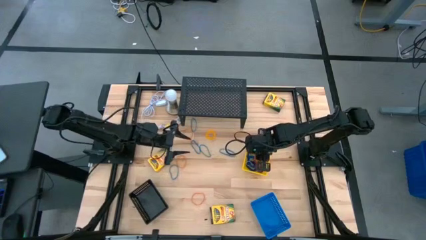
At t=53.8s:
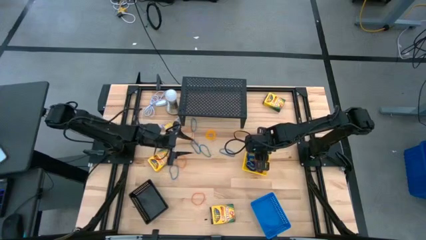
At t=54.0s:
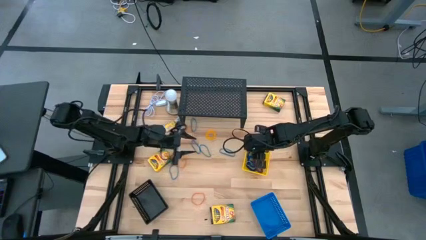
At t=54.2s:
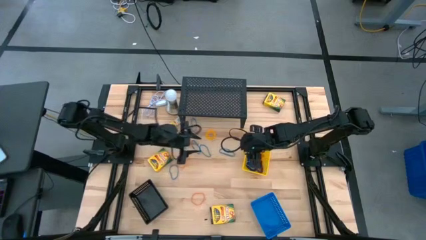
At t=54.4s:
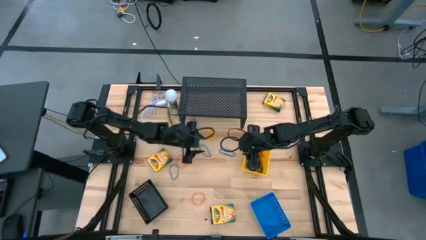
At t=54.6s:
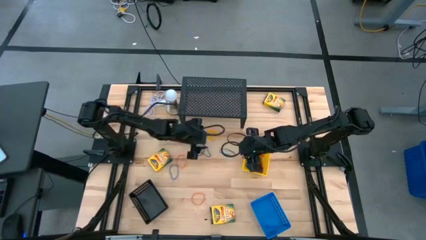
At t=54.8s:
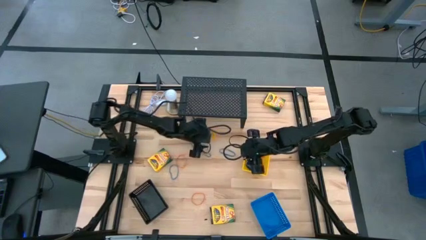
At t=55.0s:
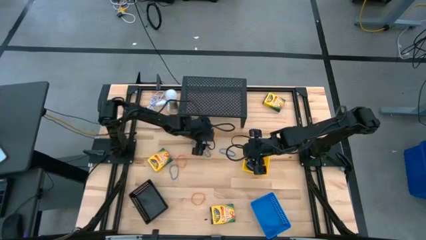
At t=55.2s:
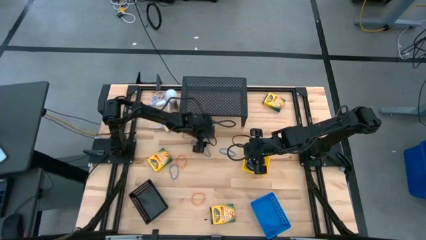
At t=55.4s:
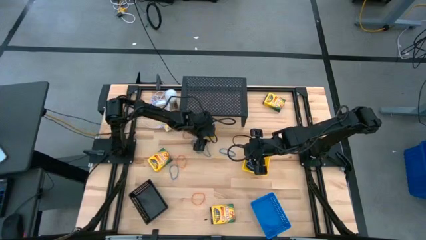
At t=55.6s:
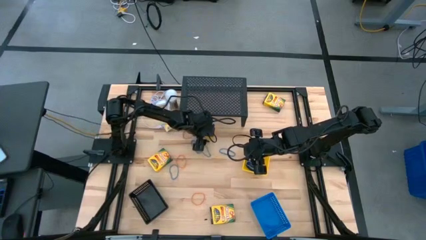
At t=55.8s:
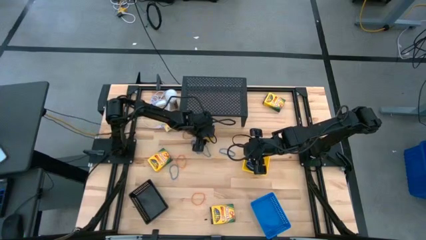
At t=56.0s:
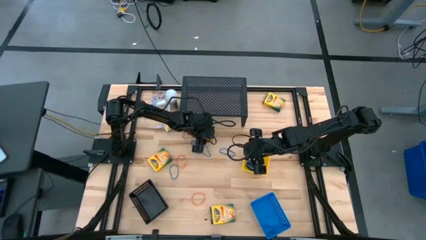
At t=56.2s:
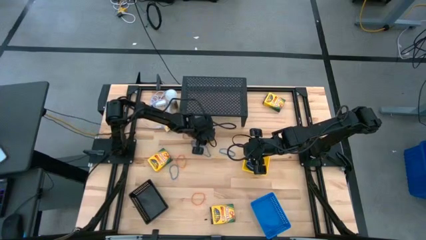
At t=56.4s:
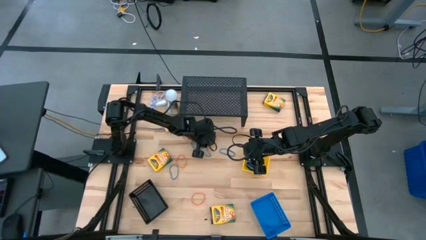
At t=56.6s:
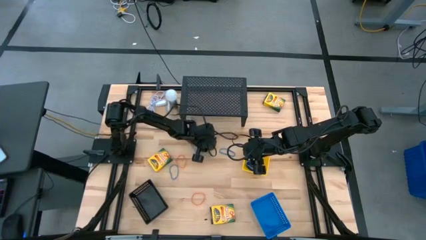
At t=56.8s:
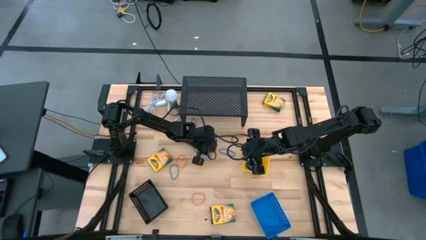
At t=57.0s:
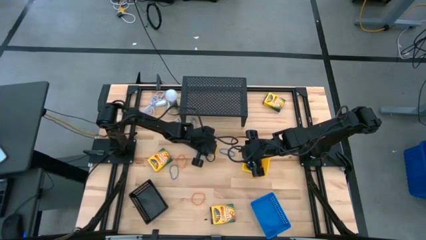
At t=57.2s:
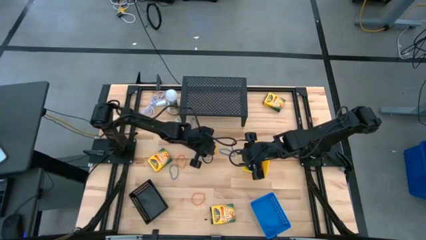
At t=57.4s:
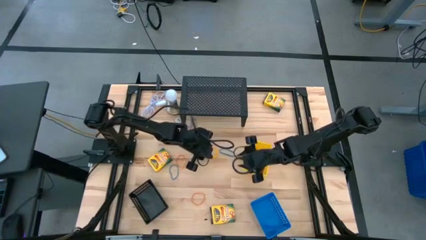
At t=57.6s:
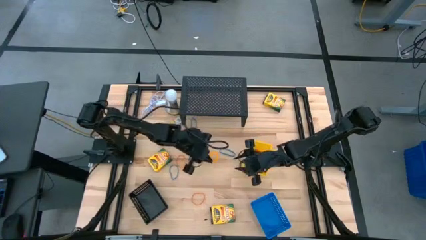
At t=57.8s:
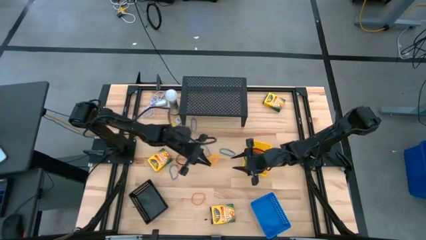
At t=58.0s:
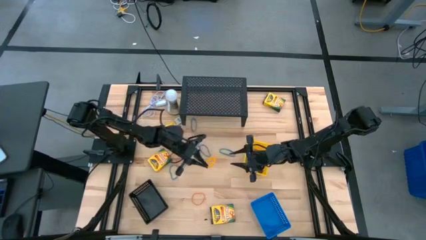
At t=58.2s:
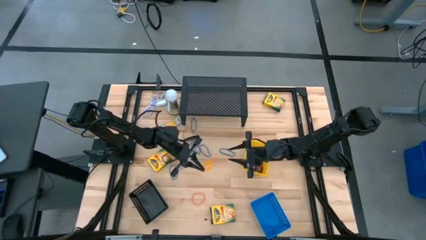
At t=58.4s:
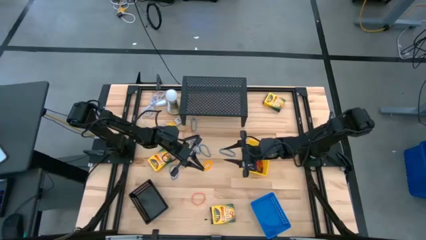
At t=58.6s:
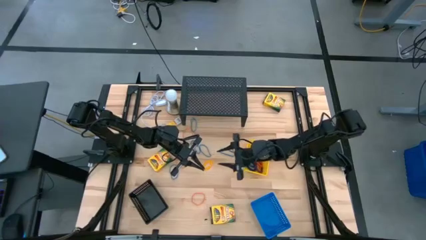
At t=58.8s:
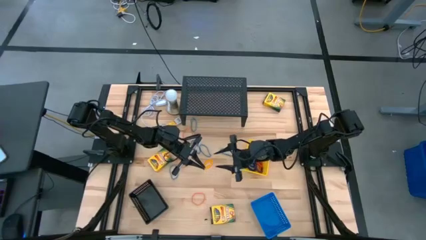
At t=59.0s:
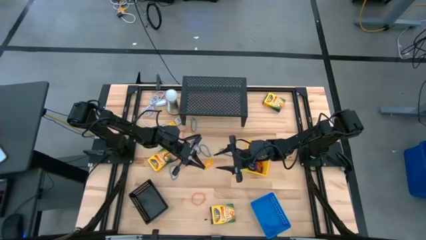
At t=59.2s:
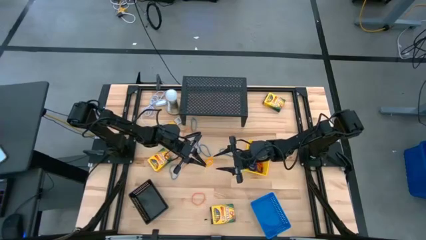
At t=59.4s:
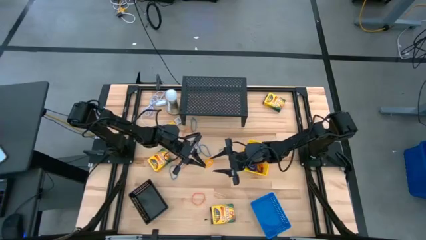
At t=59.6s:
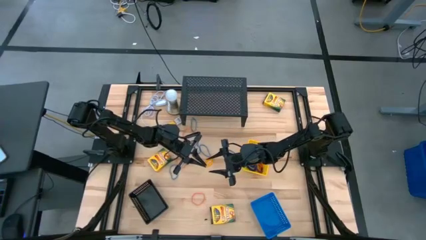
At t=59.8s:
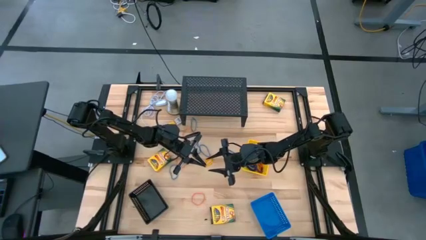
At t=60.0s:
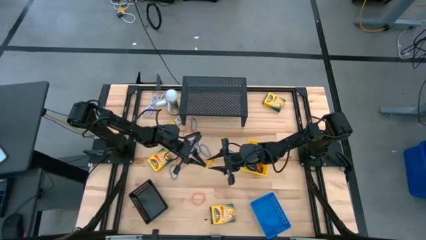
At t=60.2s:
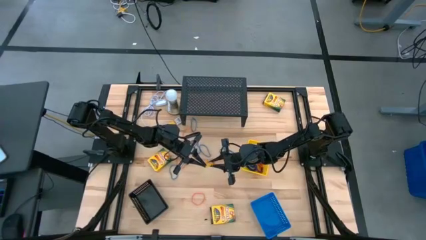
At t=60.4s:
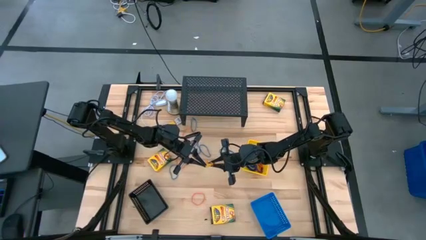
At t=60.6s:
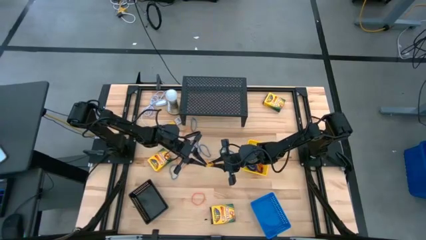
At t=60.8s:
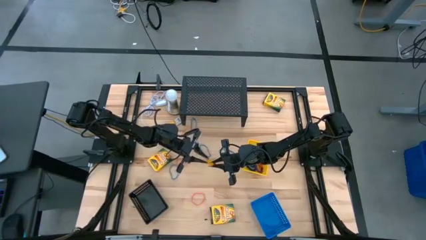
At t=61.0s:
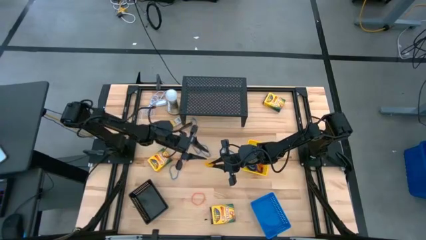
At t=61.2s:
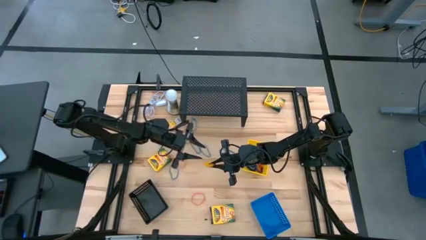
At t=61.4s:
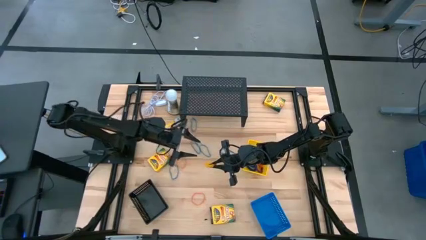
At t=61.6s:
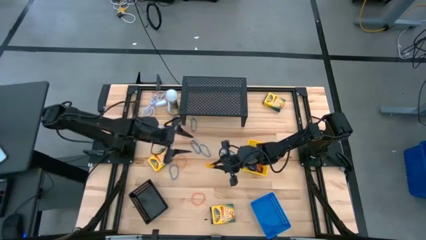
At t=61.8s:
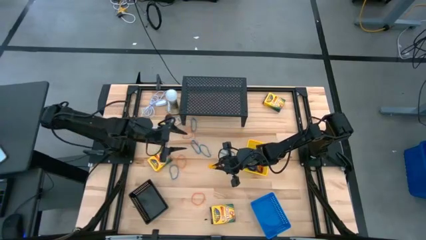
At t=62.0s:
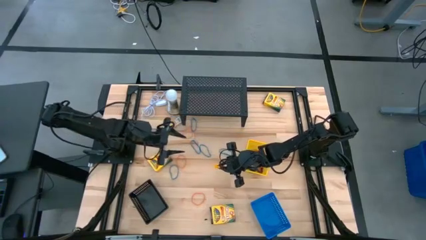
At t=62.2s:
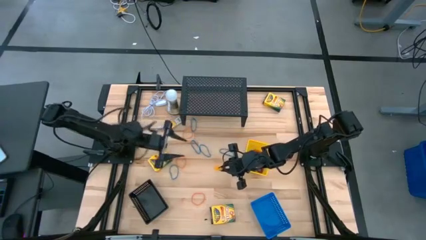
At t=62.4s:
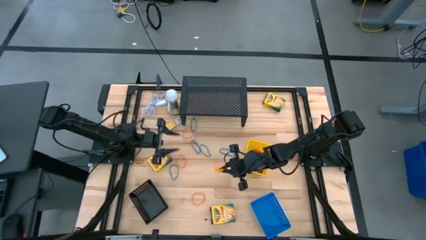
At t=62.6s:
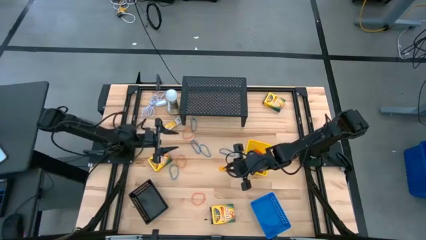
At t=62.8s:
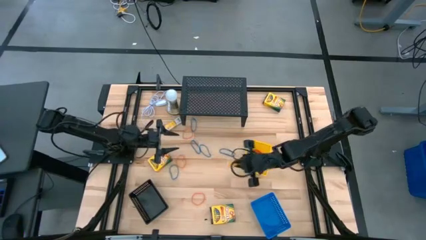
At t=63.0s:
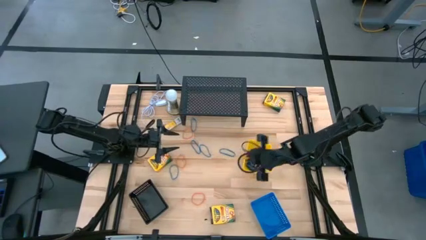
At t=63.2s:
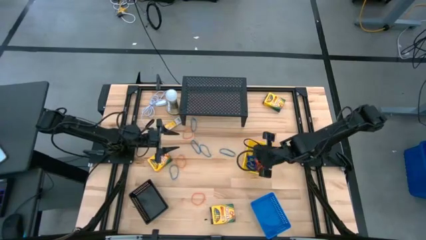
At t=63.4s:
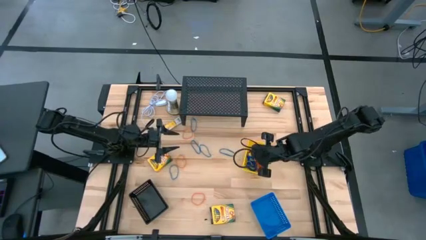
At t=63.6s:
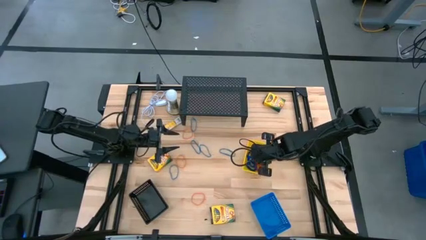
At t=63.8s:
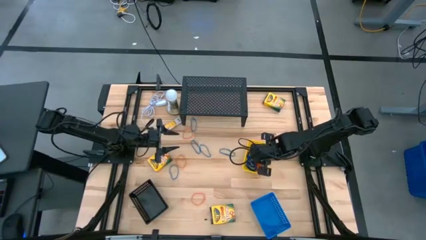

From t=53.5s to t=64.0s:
Task: Pick & Place Office Desk Supplies
Put the yellow spring keychain into the yellow basket

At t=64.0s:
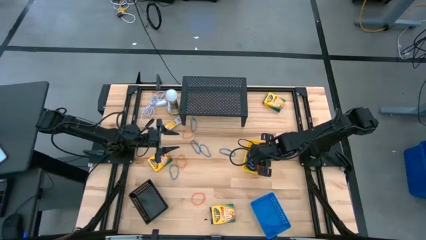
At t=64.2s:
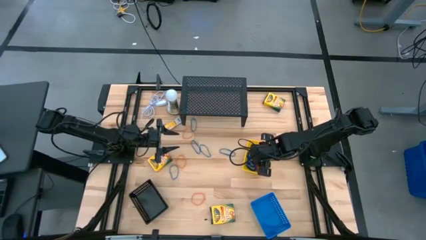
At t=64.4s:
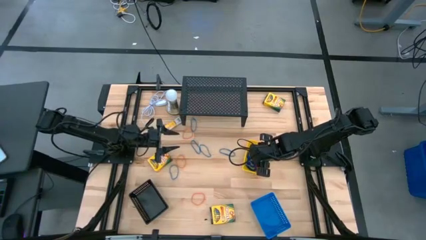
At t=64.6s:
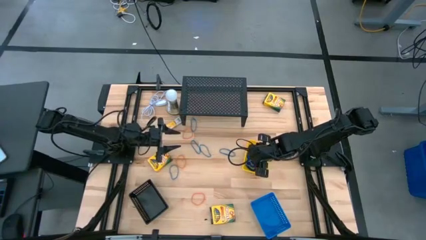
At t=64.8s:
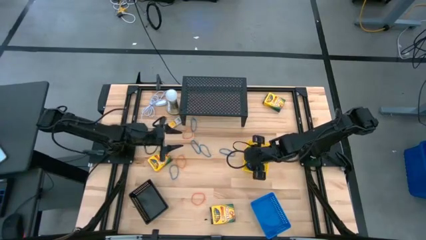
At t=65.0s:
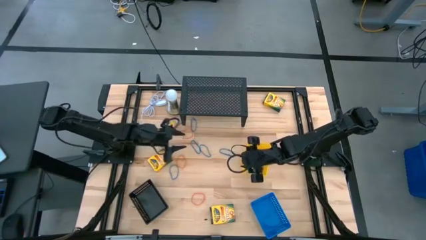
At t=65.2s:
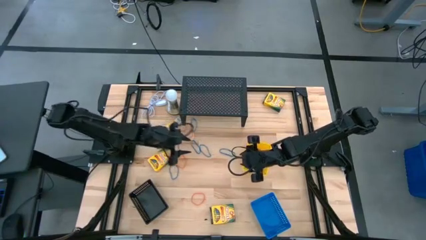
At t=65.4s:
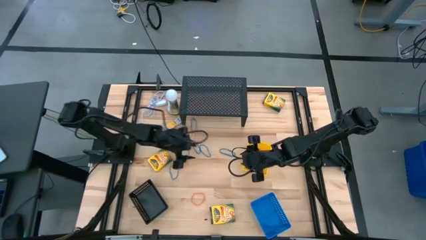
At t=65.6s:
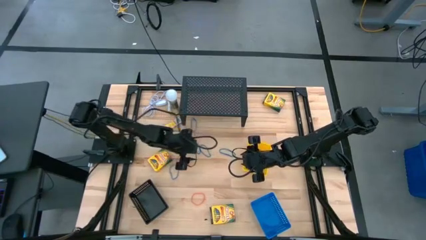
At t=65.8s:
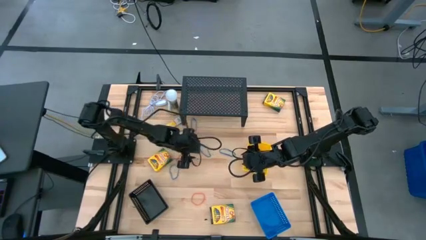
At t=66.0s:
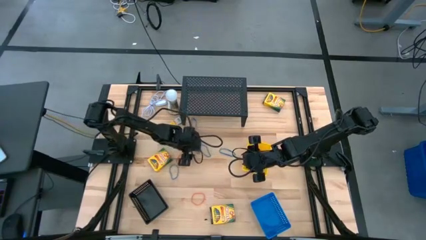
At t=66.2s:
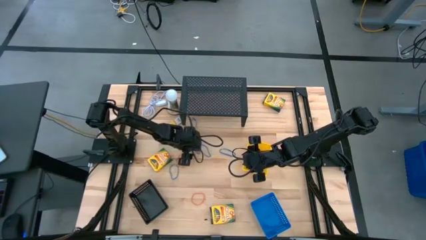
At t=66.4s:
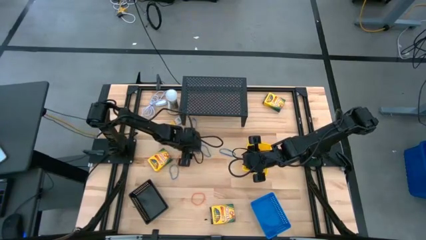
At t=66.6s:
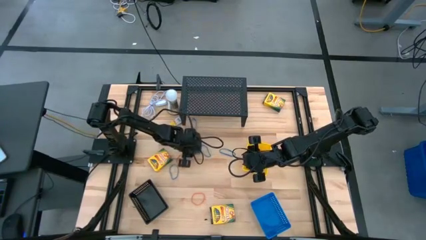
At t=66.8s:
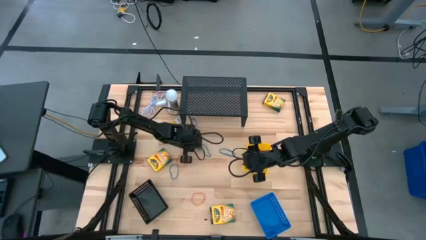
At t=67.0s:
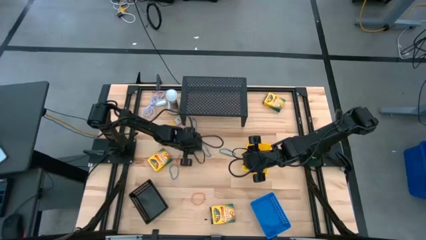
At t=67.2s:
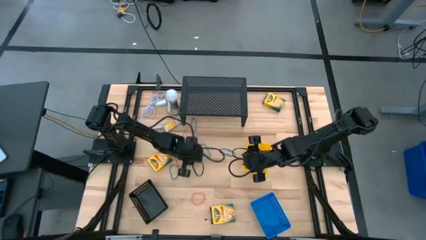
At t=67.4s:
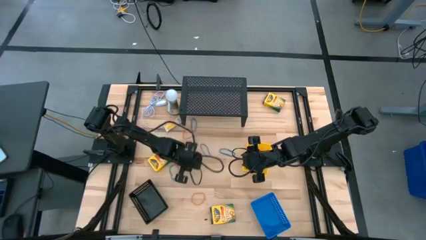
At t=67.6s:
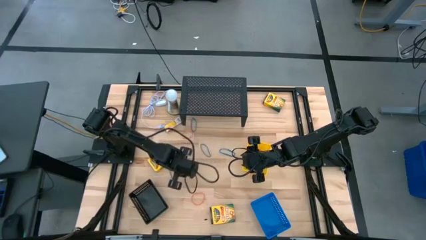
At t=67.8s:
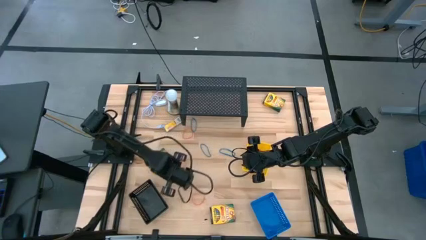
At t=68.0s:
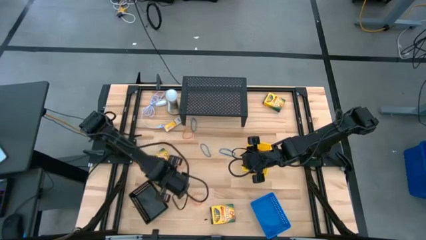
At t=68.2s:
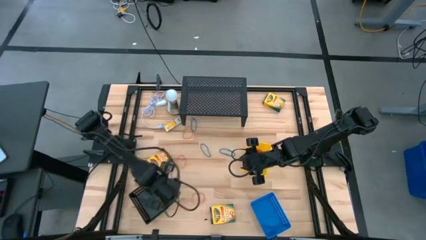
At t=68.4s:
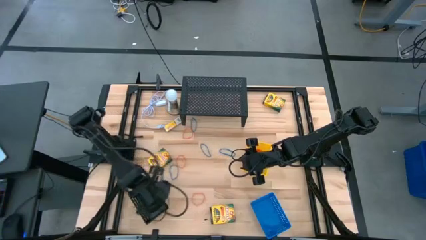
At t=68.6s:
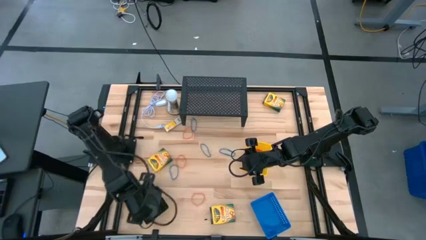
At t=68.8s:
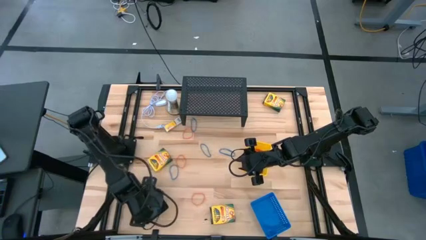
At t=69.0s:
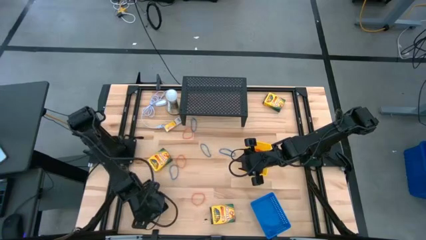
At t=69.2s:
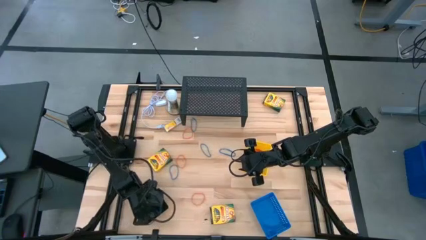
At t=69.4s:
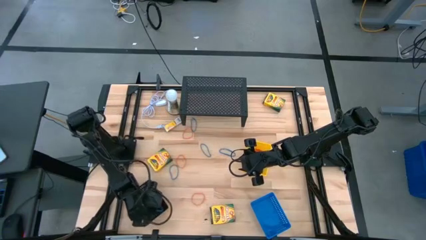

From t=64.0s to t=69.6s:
Put the blue rubber band into the black basket
